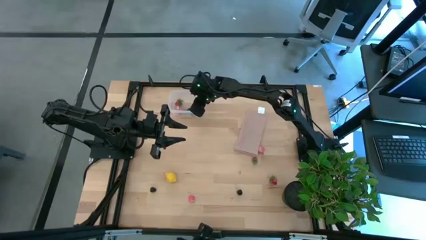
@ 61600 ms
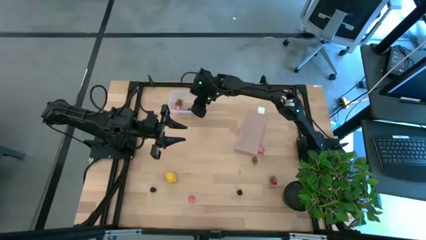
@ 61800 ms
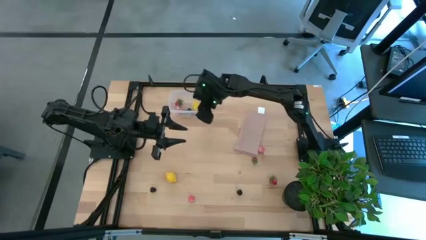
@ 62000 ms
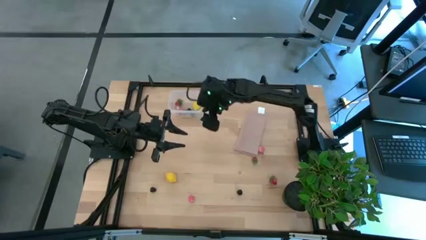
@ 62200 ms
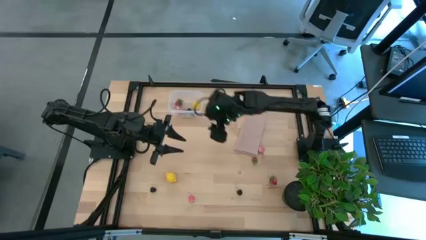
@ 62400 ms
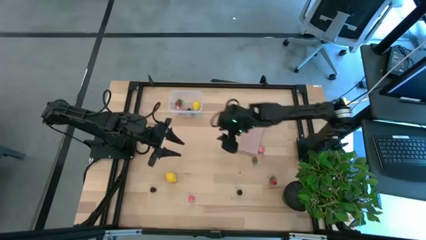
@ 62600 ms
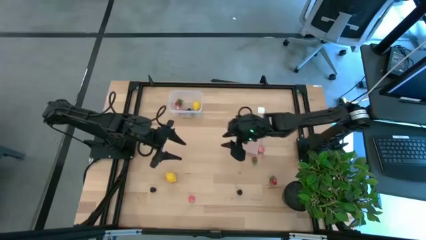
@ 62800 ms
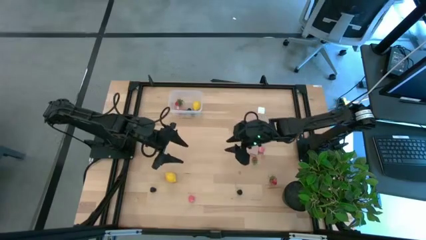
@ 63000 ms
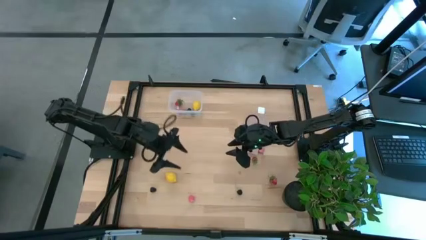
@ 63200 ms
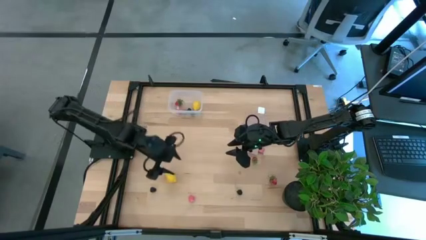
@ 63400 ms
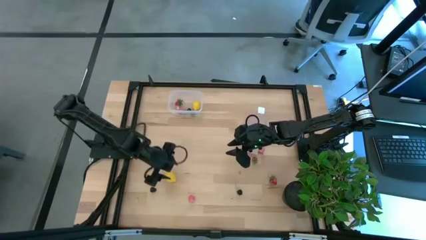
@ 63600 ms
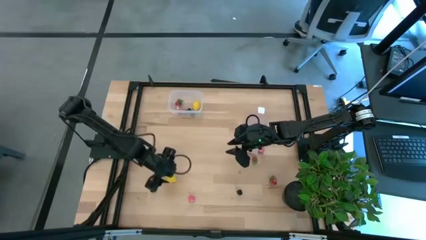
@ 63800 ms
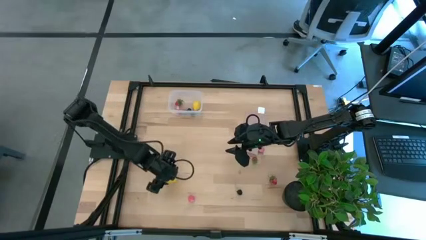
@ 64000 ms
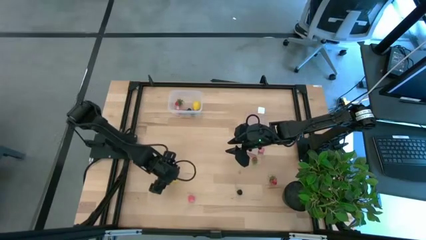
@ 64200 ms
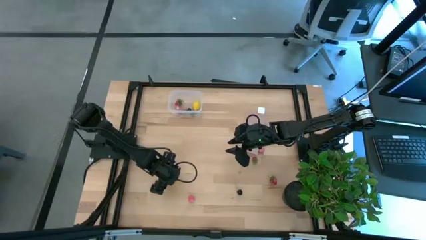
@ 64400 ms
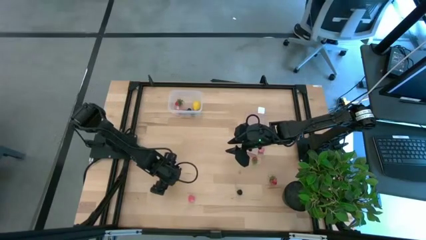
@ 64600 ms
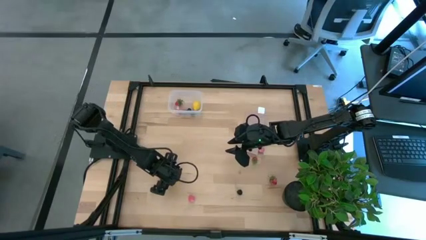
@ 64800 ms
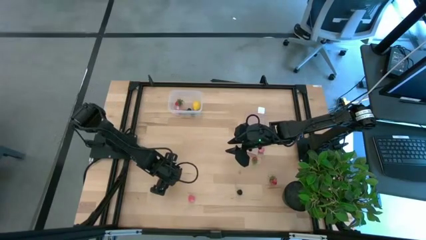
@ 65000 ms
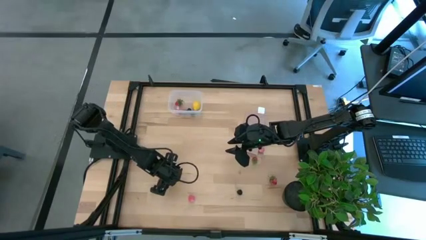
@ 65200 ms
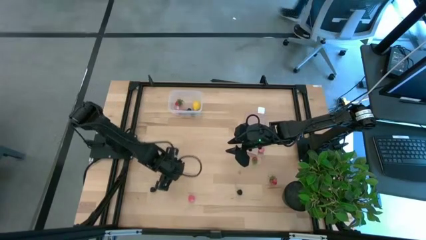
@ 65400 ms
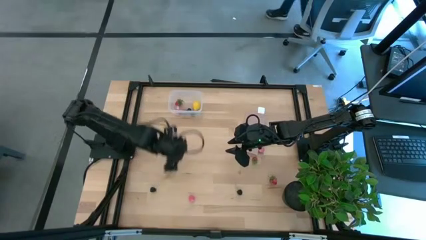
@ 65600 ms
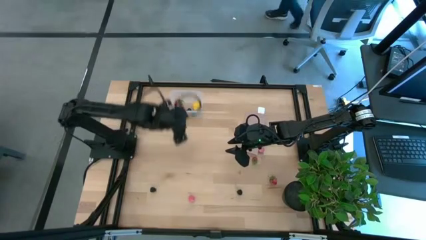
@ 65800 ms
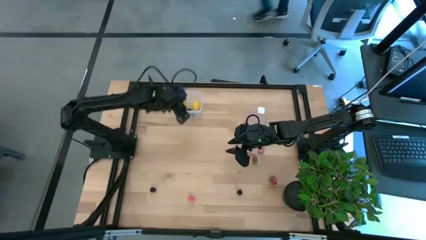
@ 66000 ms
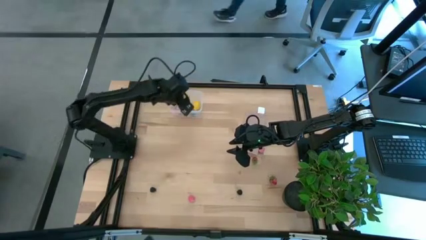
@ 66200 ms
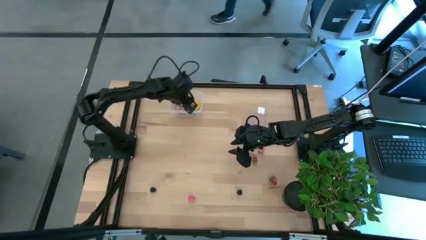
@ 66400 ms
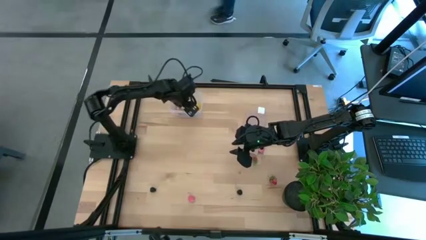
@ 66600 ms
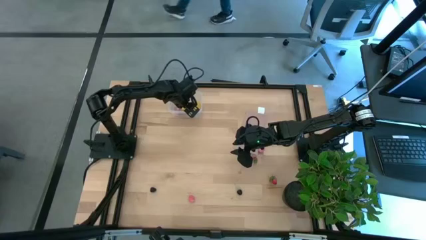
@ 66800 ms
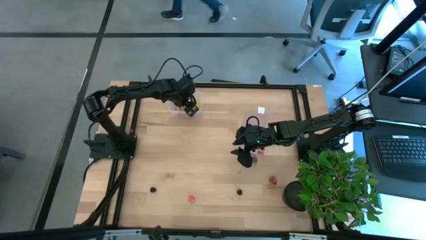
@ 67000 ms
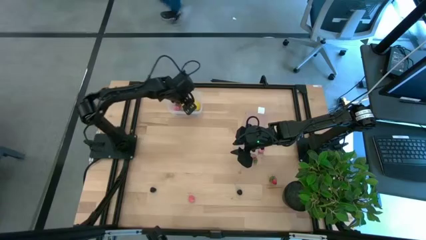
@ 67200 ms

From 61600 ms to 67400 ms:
Task: Pick and placing Produce into tupperware
Put the lemon into the transparent bin

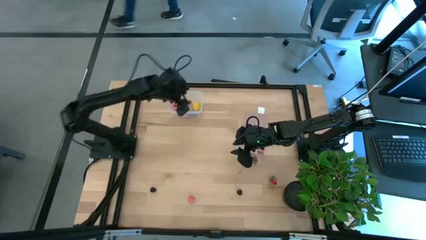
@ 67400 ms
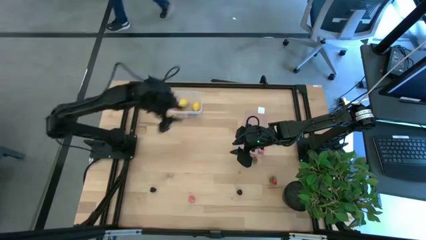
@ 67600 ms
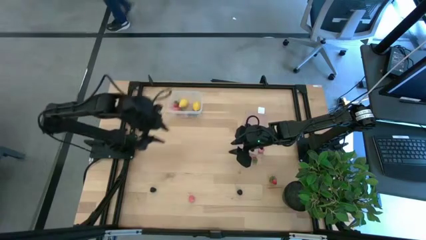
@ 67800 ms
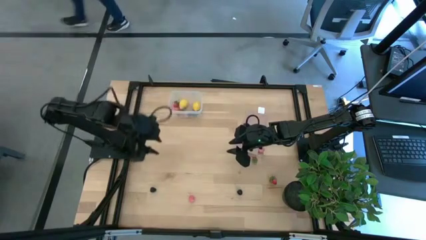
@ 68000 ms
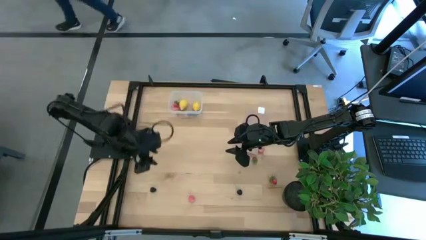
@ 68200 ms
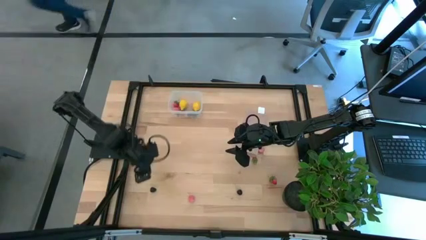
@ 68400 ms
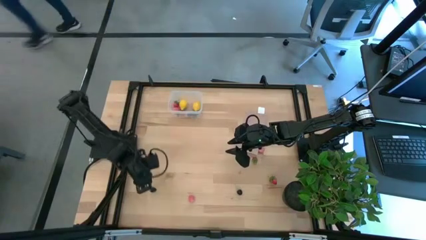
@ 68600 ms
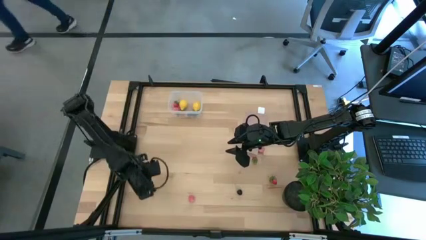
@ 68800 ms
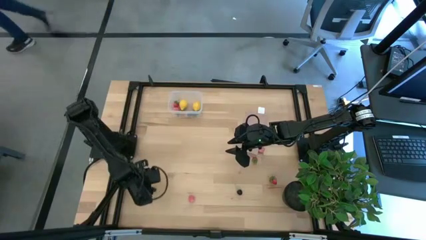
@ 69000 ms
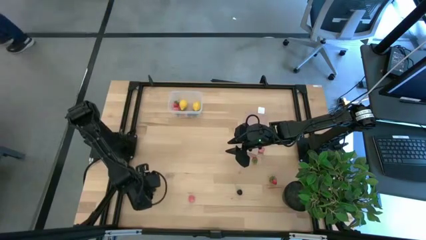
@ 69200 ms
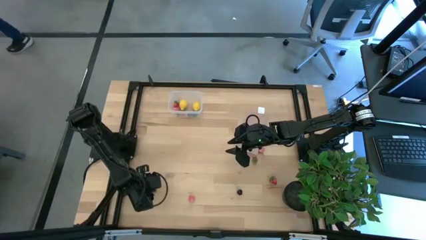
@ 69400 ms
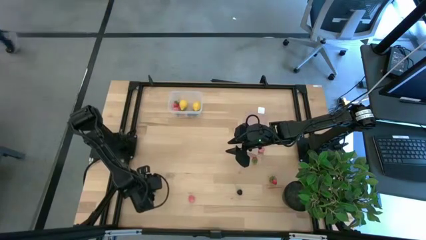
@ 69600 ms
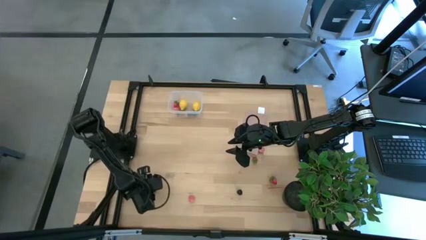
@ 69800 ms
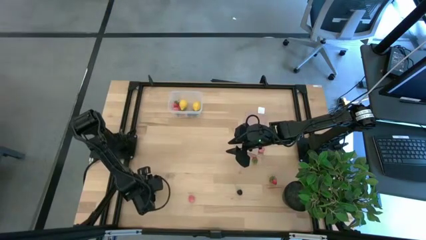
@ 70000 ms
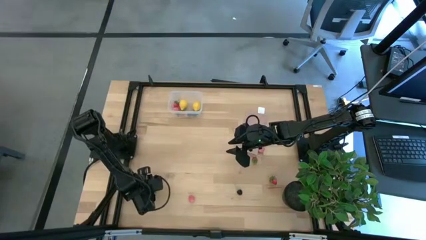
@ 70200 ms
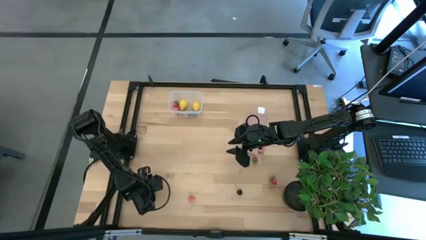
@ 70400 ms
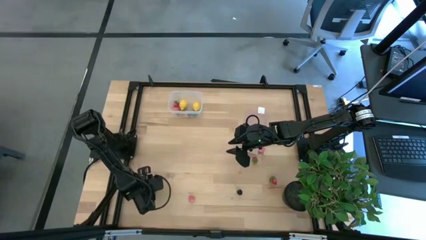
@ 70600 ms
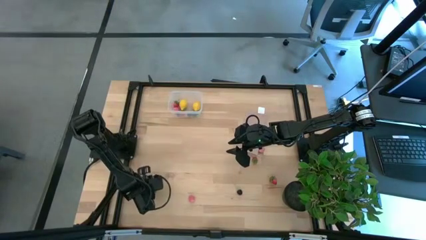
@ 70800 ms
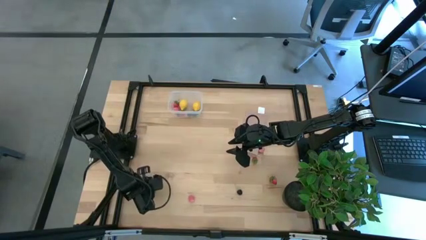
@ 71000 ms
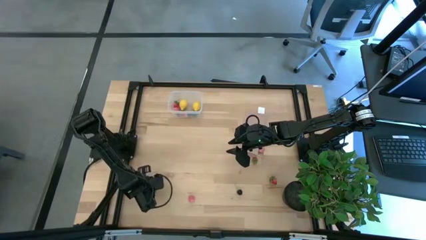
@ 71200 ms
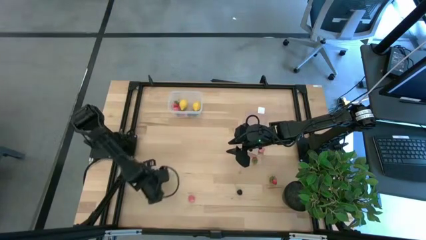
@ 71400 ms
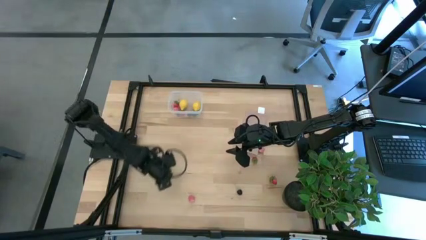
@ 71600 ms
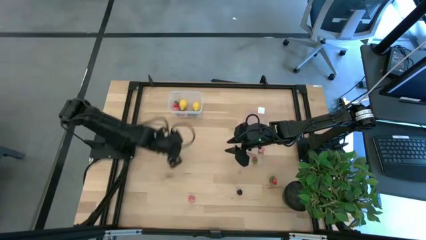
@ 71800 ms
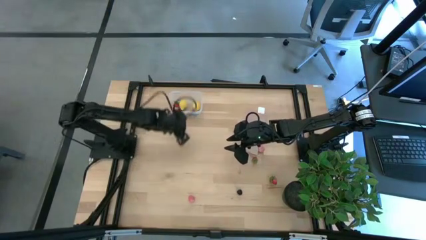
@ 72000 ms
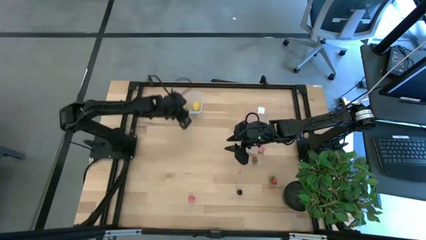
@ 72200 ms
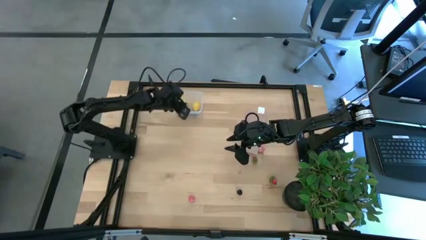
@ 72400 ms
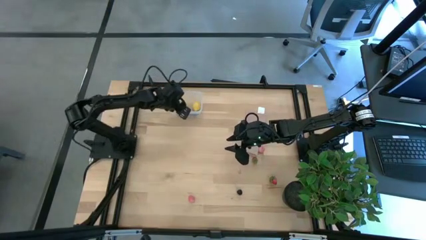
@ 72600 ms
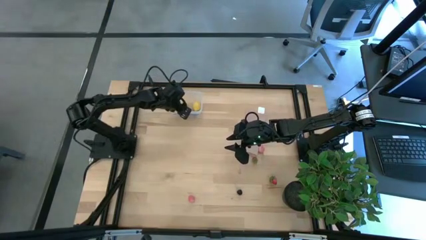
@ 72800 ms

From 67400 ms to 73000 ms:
Put the blackberry into the transparent bin

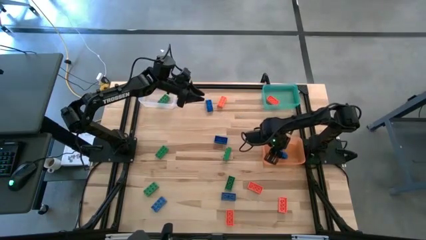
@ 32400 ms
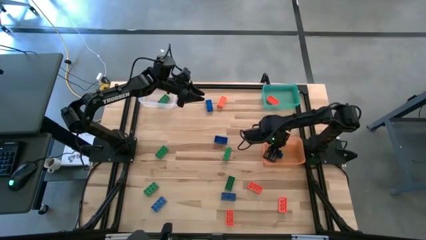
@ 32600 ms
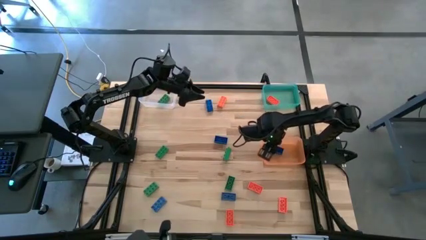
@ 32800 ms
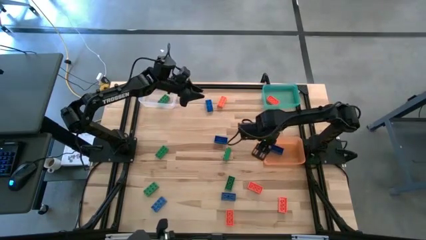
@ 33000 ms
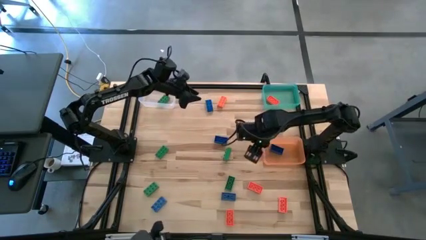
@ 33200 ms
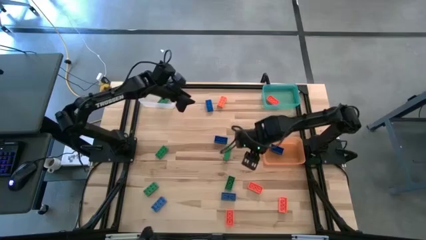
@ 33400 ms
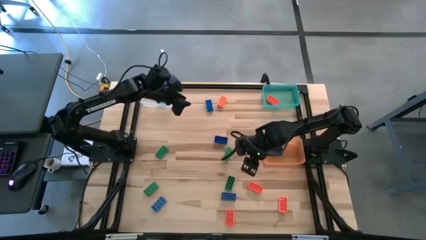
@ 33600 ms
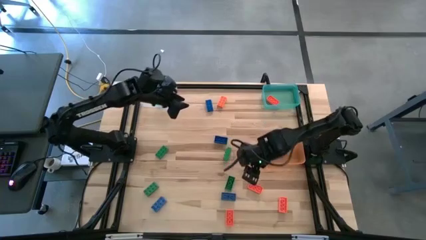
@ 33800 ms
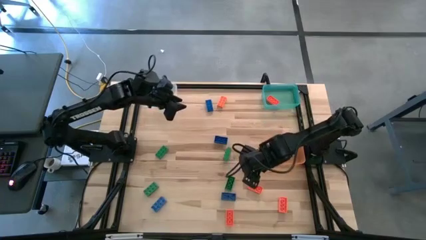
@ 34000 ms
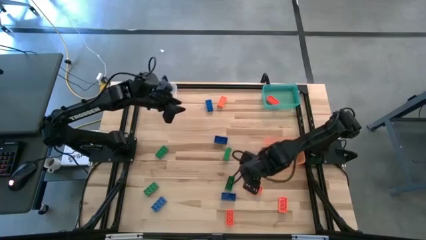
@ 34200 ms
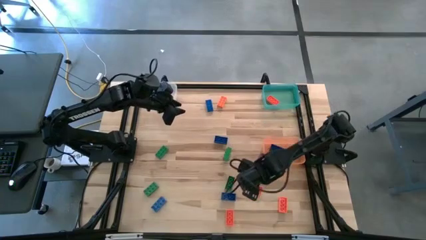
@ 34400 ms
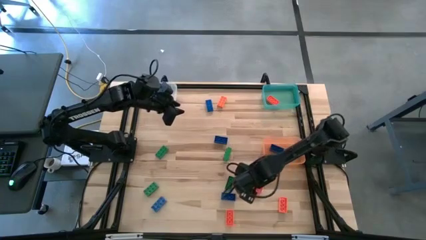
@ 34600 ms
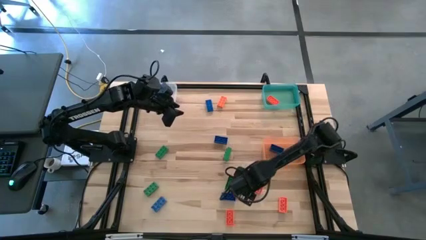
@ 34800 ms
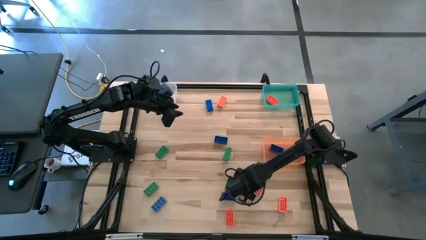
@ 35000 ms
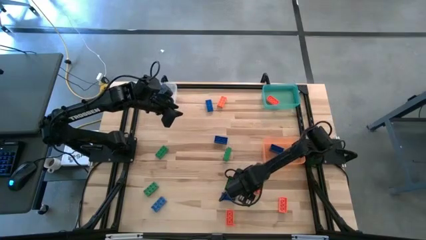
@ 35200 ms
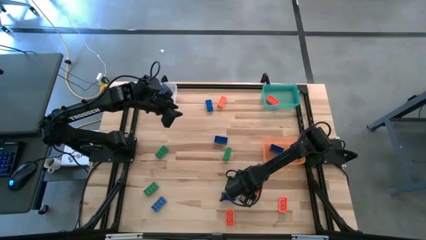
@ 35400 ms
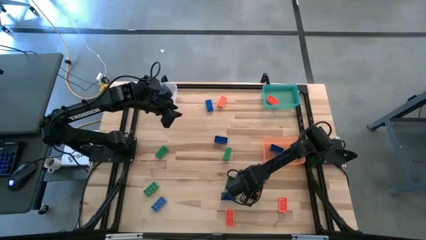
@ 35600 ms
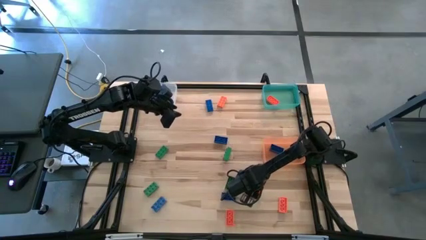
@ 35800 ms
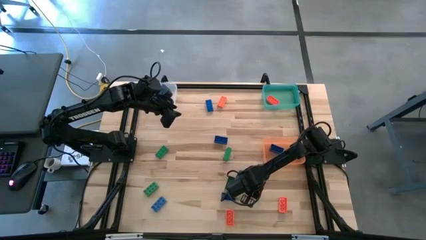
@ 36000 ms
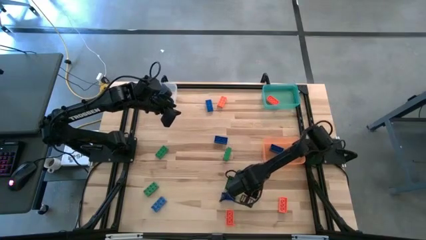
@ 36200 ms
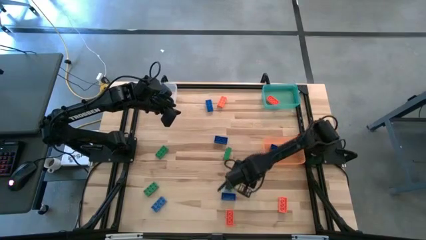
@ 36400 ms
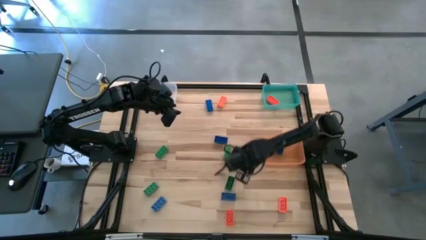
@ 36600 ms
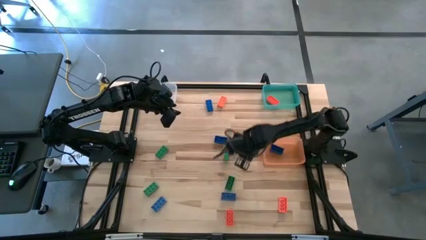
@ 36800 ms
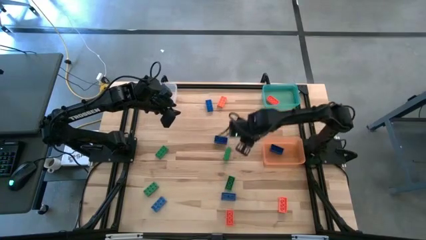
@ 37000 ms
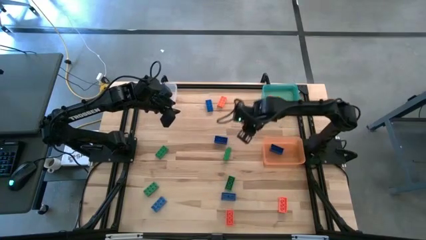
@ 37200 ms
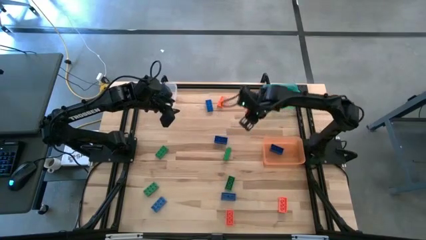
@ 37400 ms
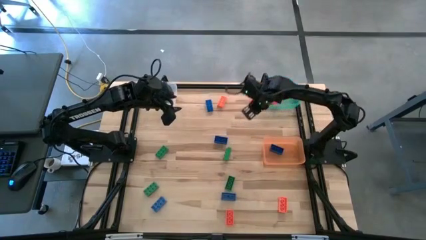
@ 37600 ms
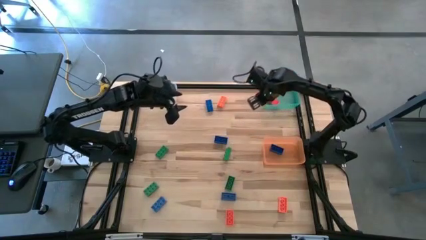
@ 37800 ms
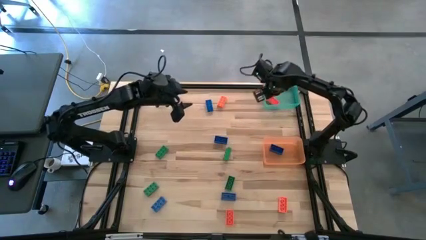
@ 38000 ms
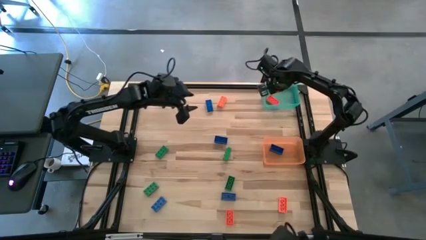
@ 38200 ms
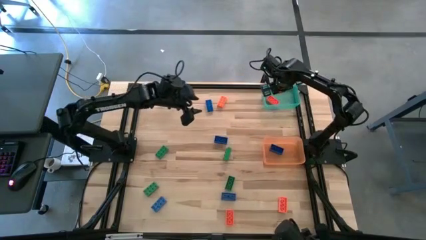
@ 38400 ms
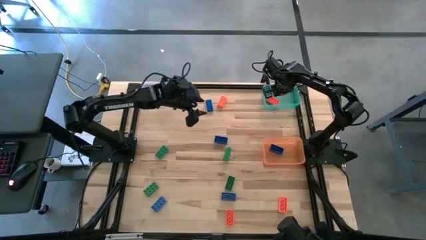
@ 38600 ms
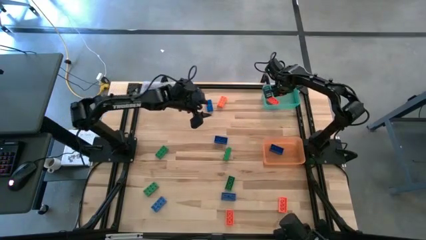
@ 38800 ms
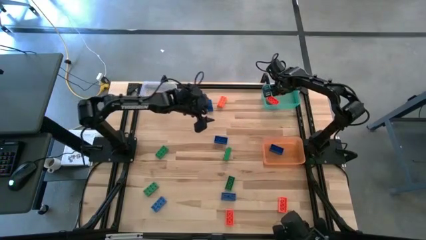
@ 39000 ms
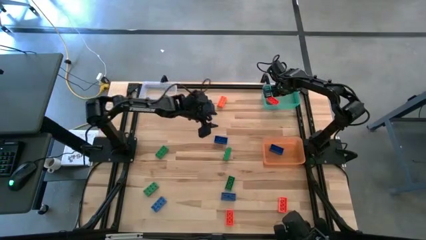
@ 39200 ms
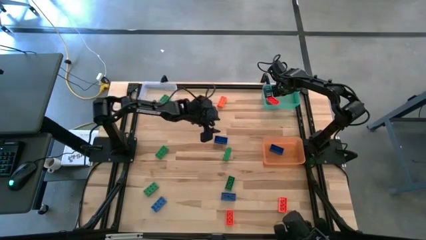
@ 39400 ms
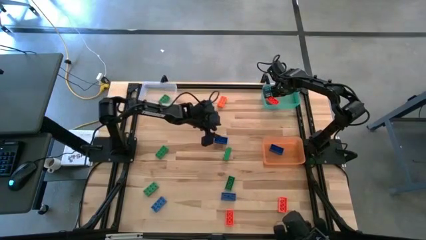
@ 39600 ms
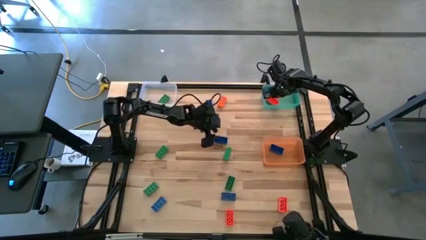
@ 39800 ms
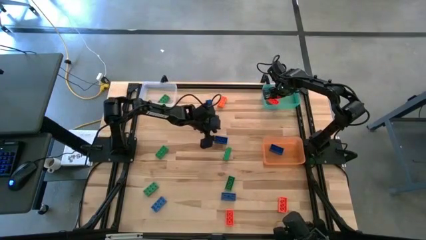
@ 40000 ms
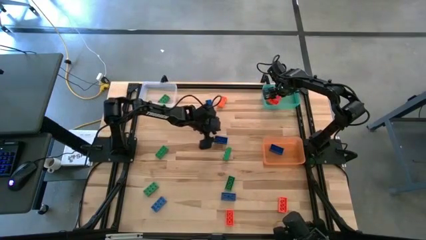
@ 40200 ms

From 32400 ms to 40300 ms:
Task: Sort & place blocks by color
Put the orange game piece into the blue bin
